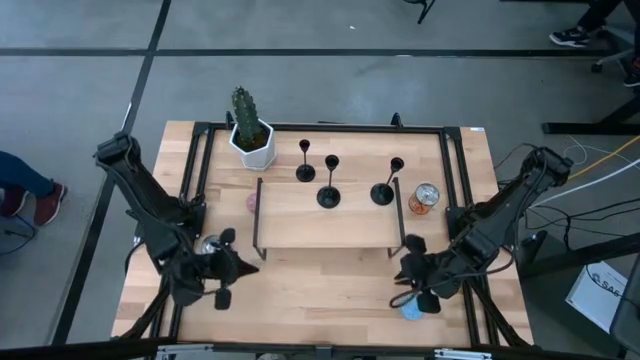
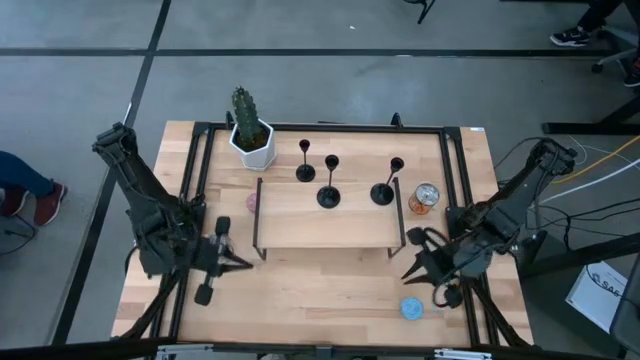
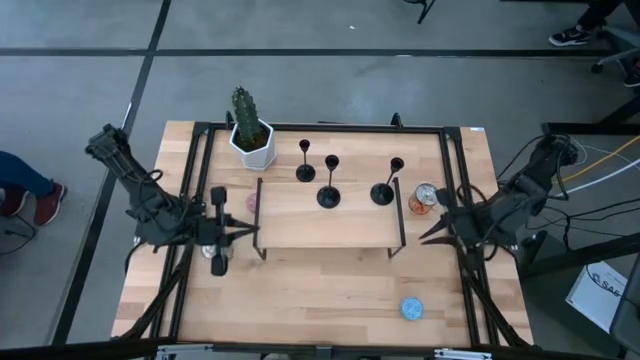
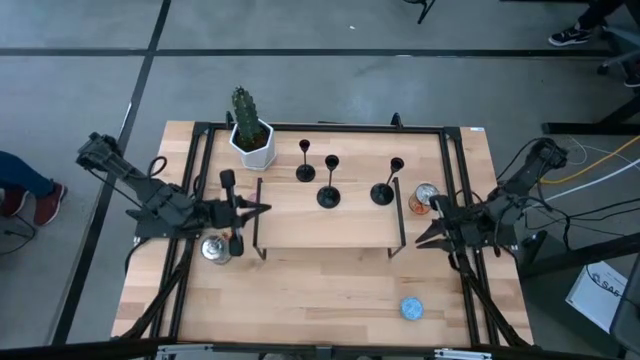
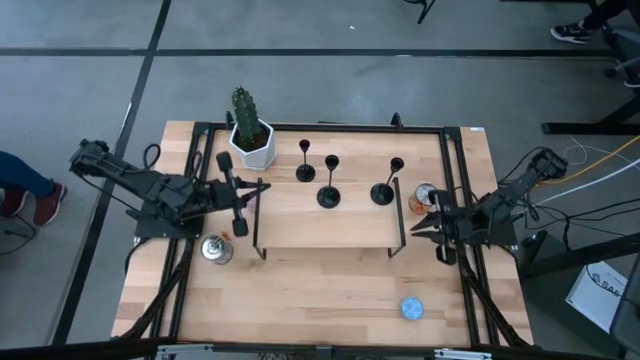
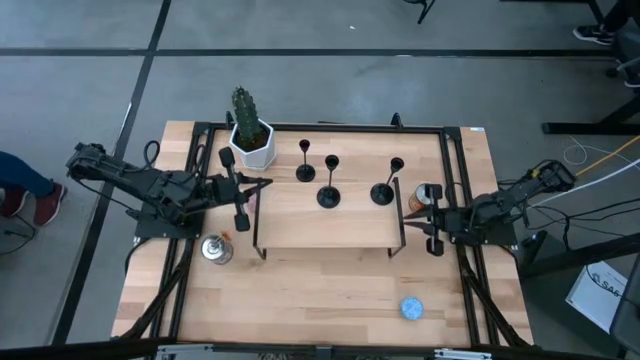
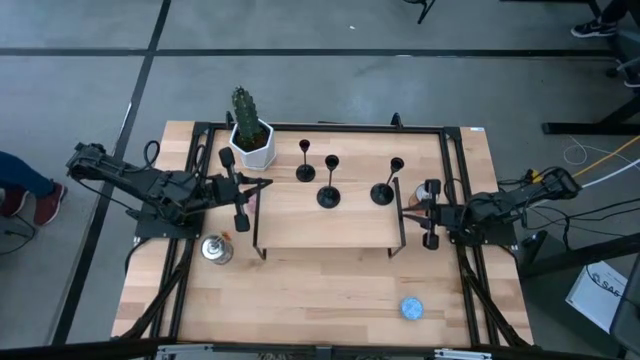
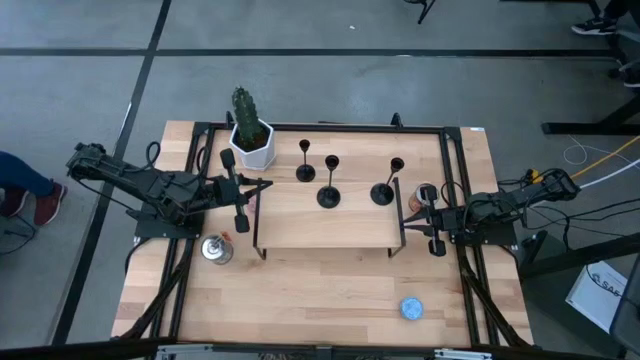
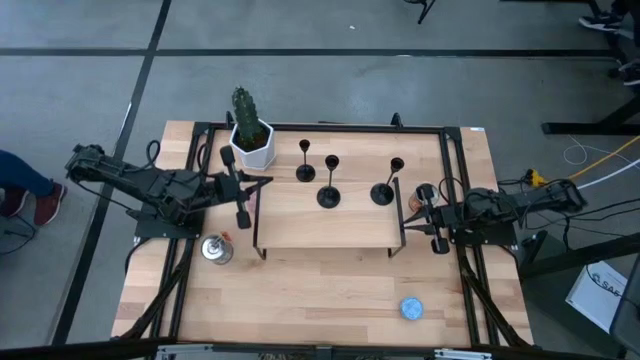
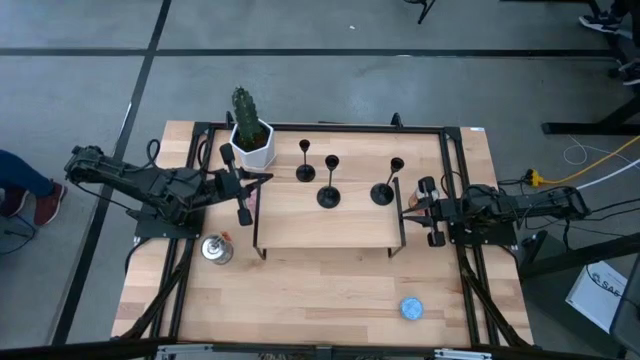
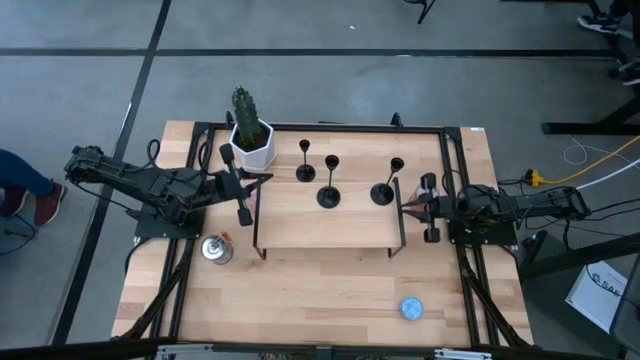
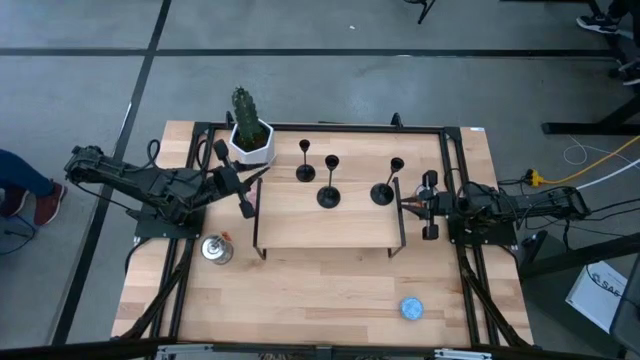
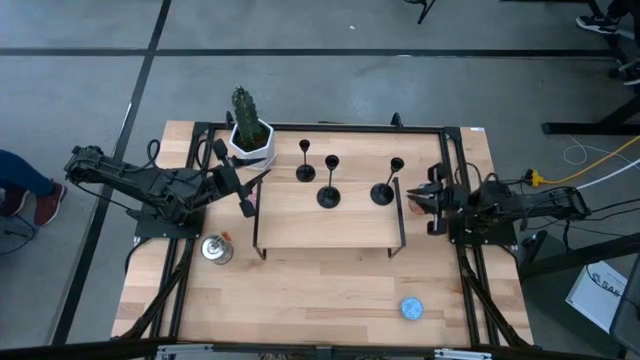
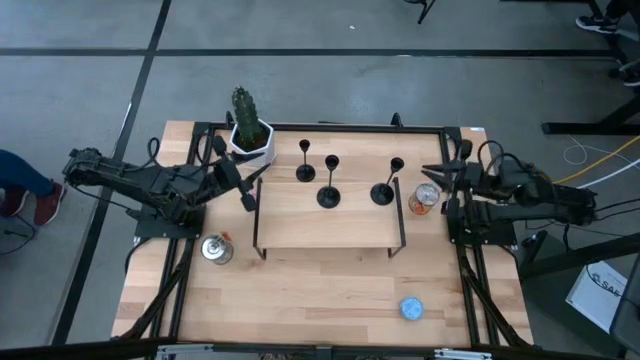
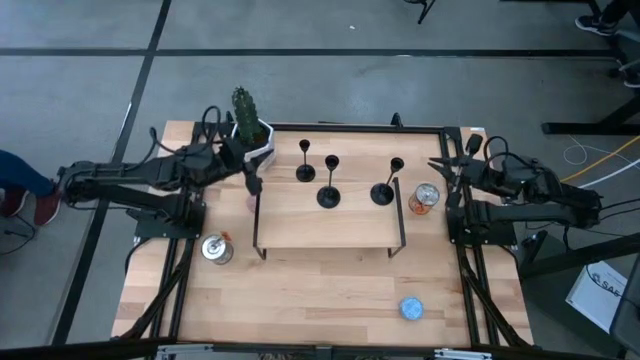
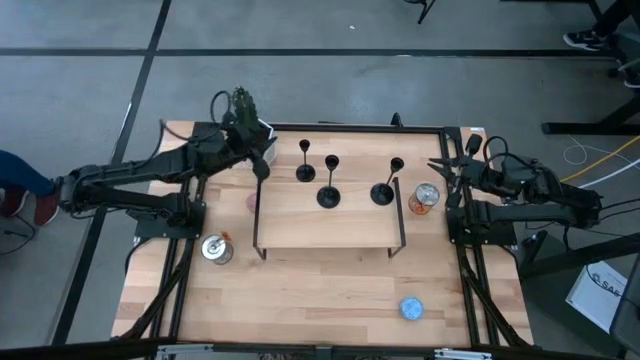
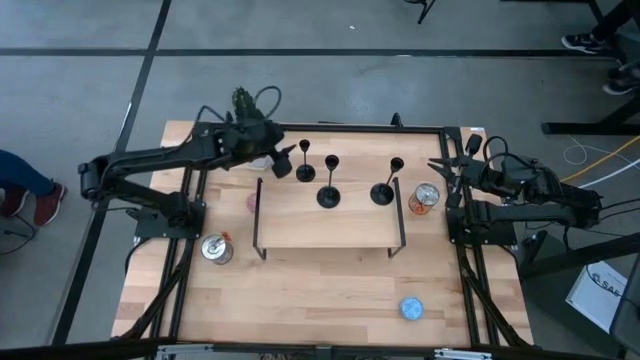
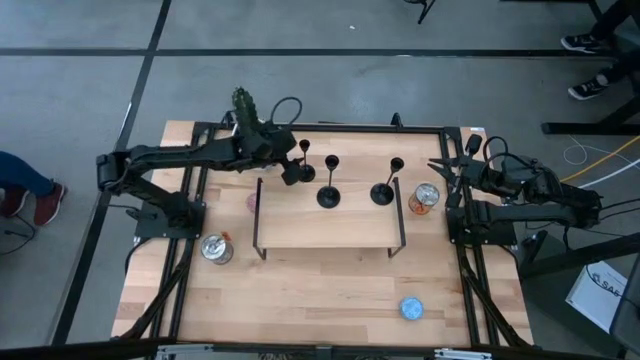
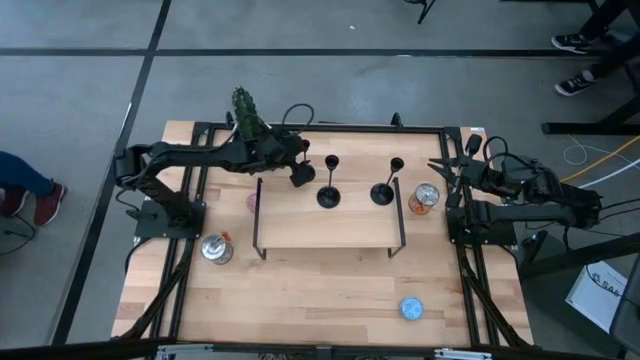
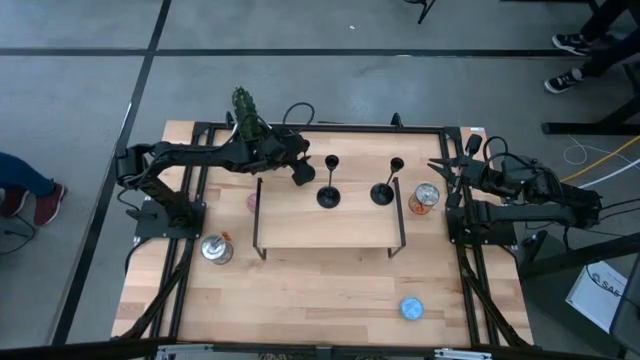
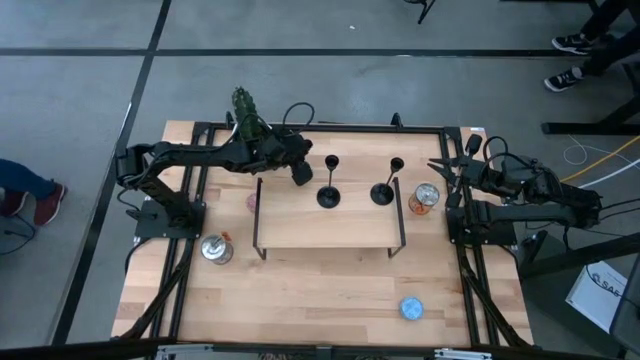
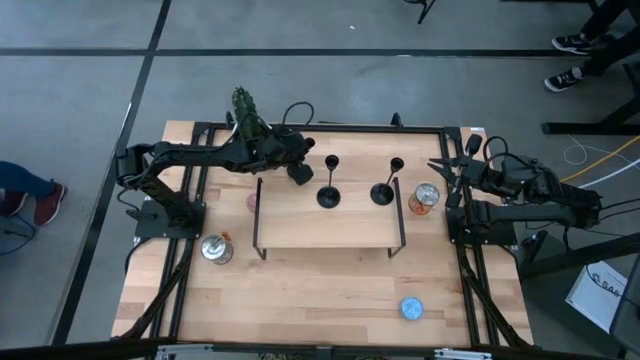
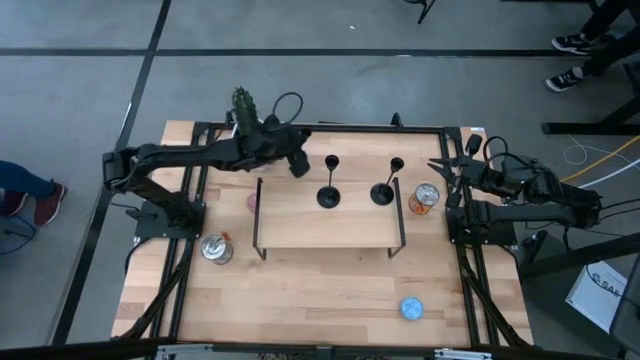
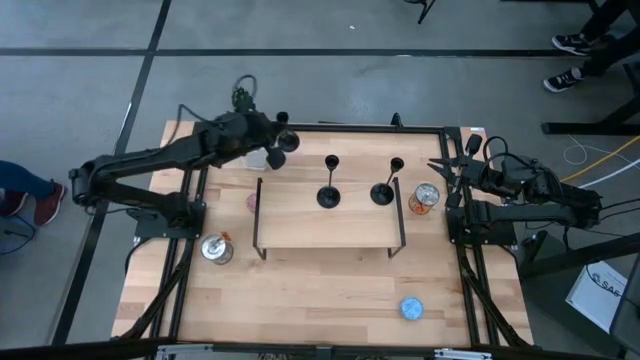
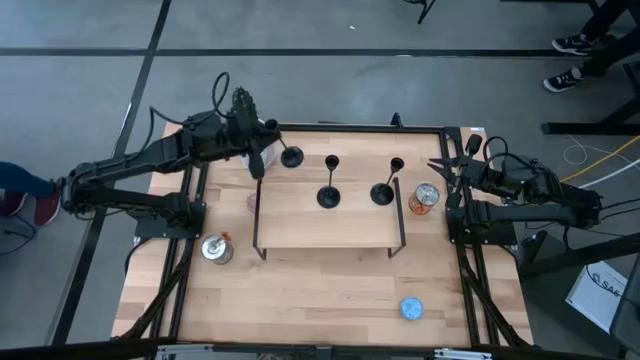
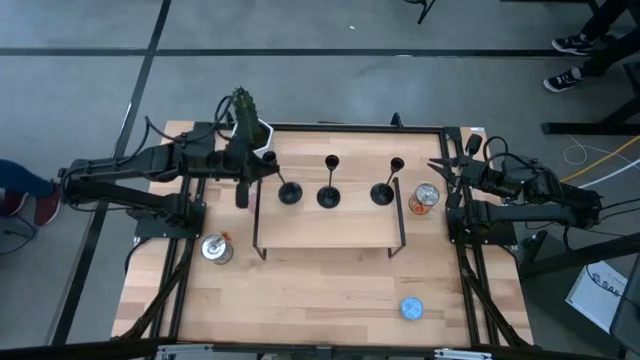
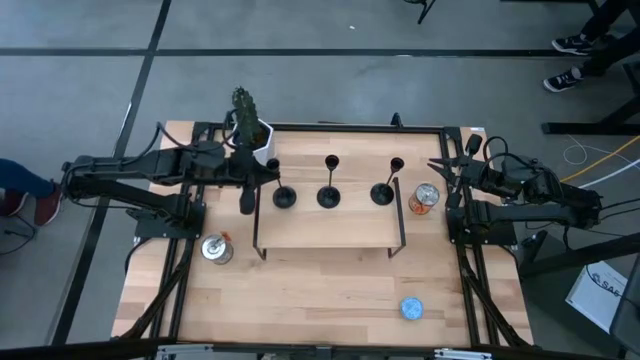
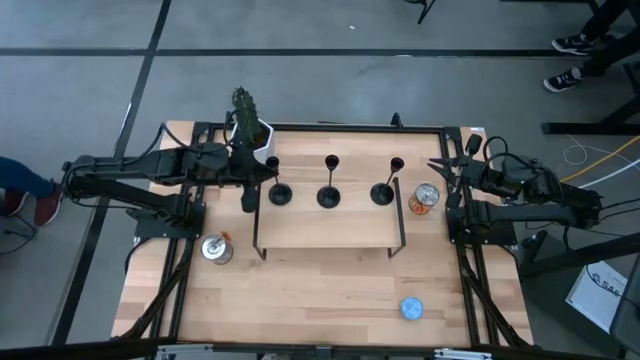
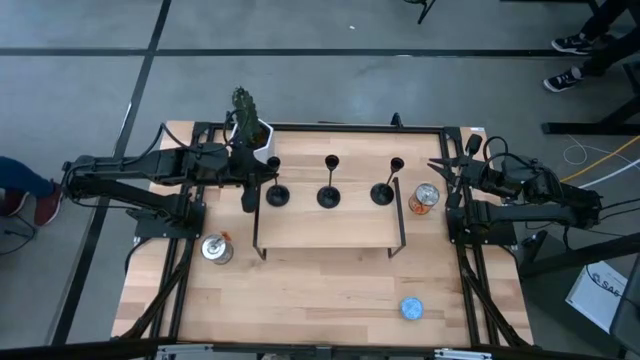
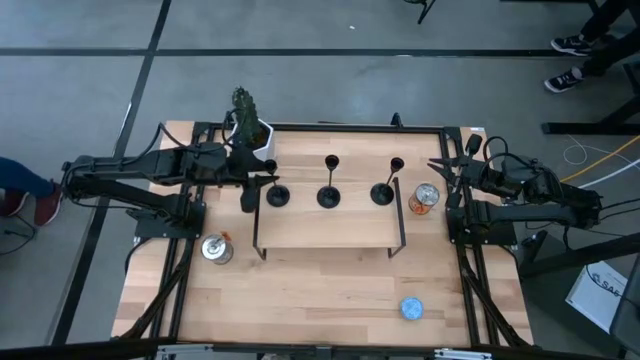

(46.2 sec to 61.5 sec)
Task: Pick & Place candle stick holders
Put the black candle holder on the shelf

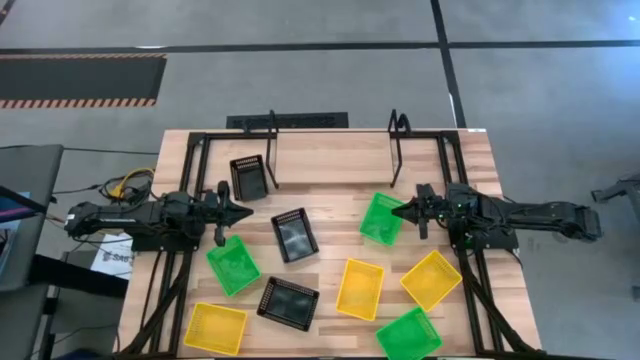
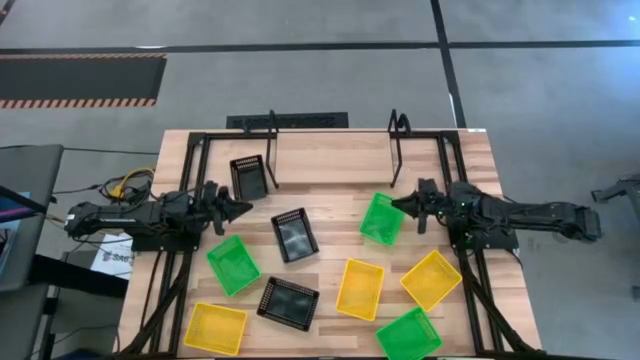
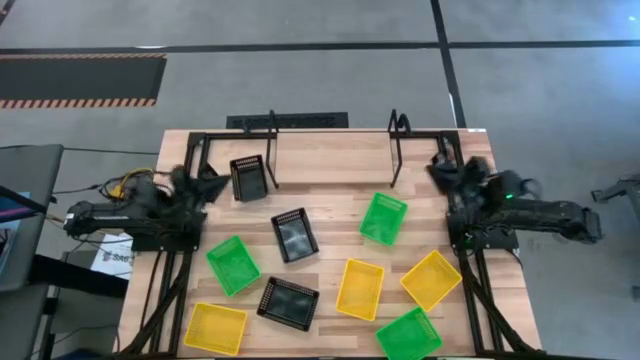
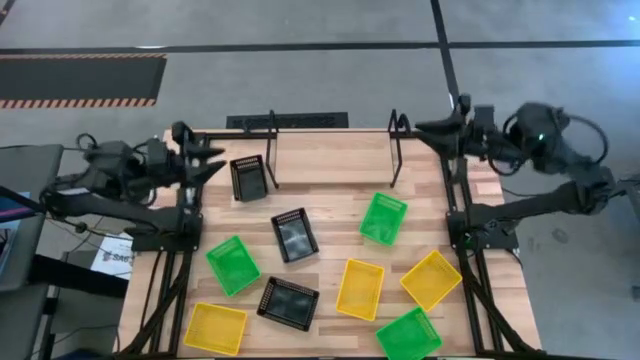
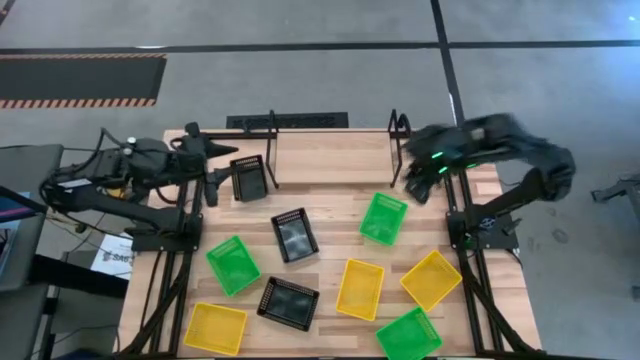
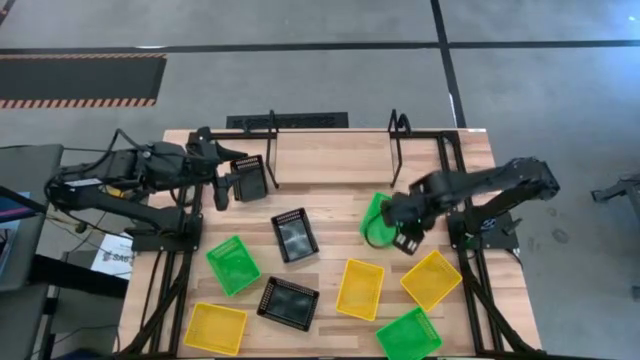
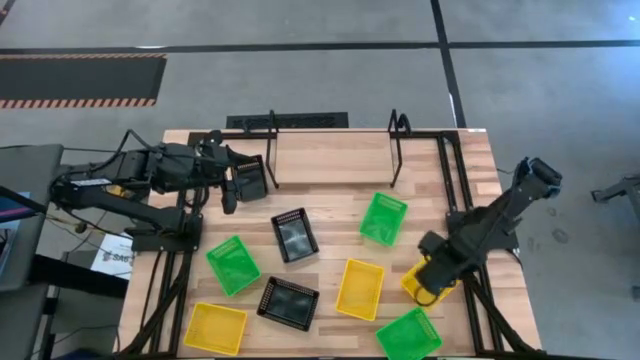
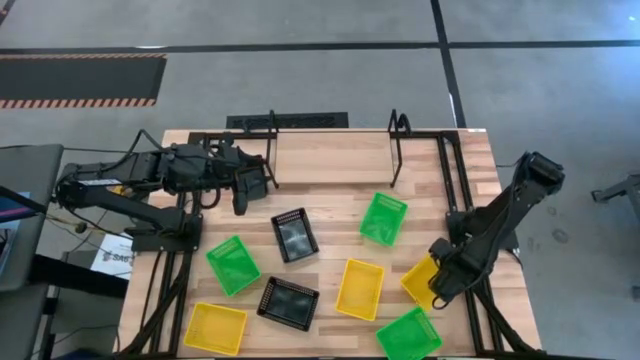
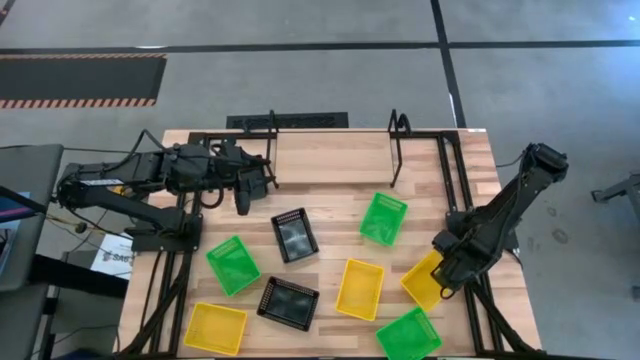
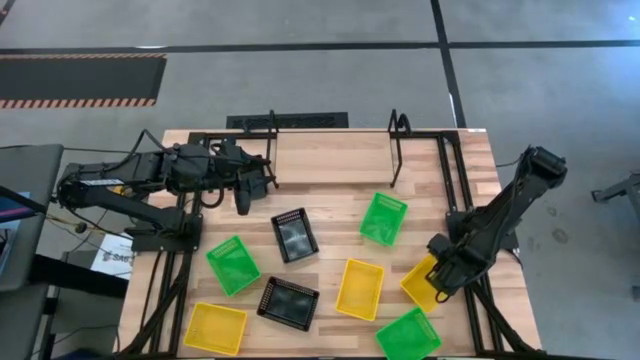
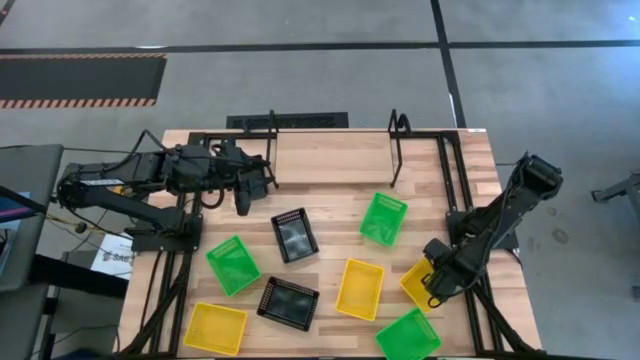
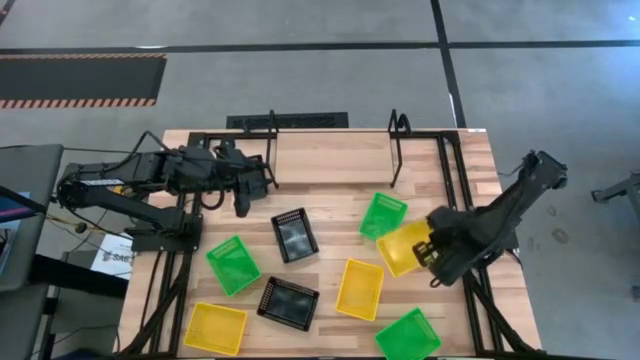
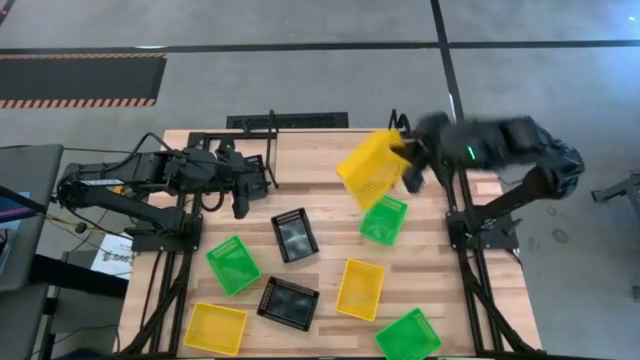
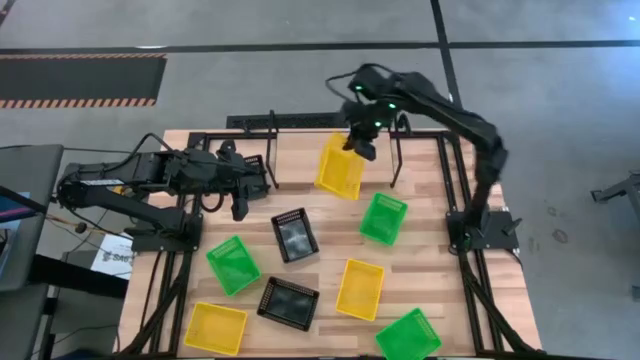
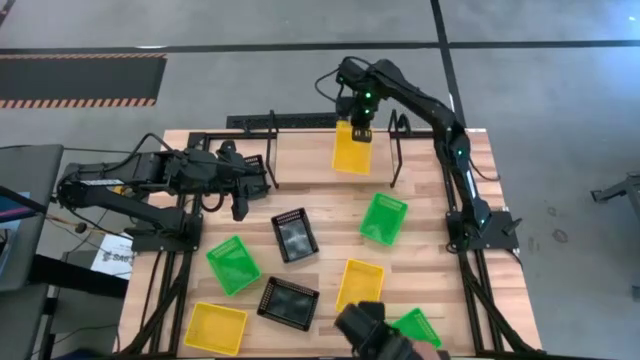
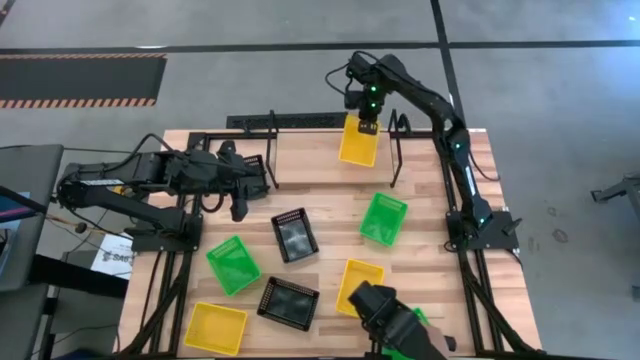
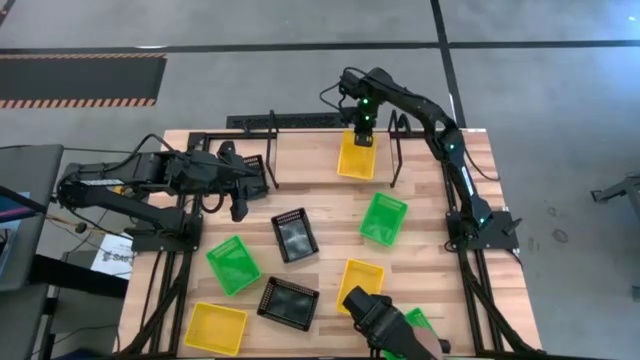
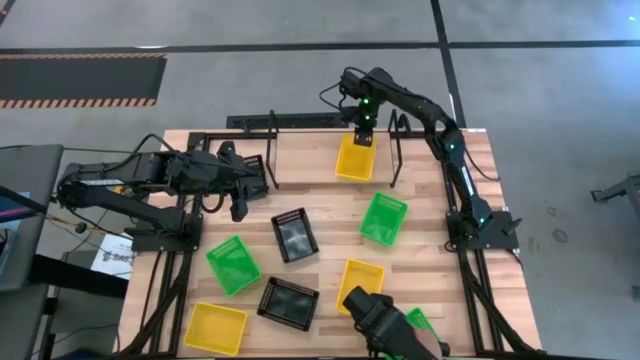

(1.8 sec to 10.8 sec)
Task: Stack baskets on shelf by color
Put the right yellow bin on the shelf
